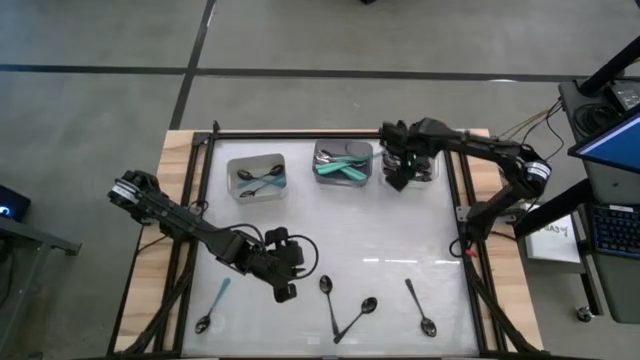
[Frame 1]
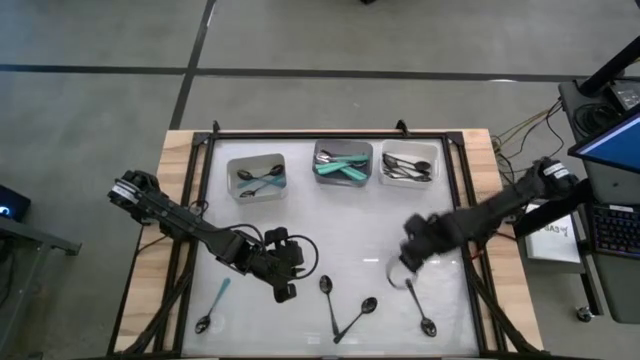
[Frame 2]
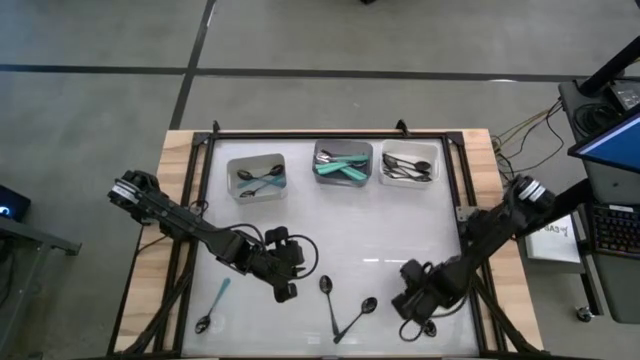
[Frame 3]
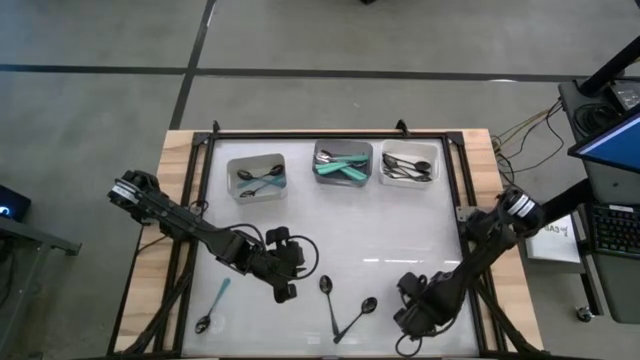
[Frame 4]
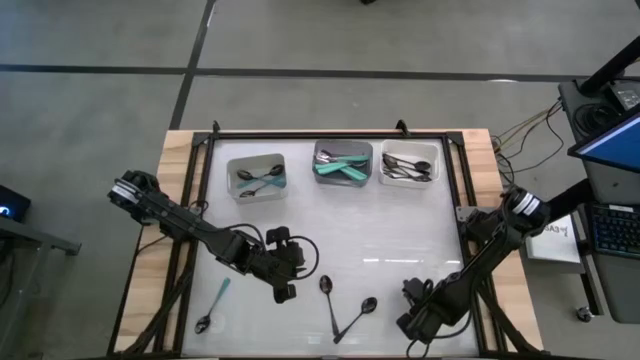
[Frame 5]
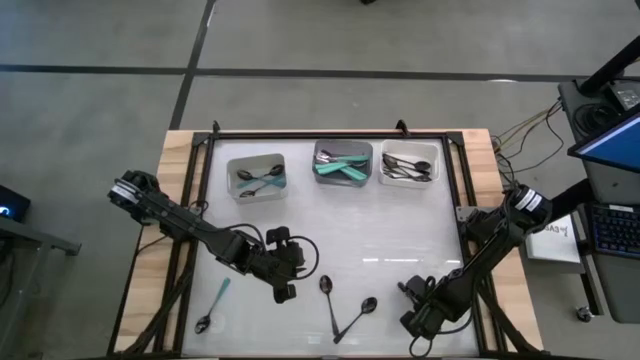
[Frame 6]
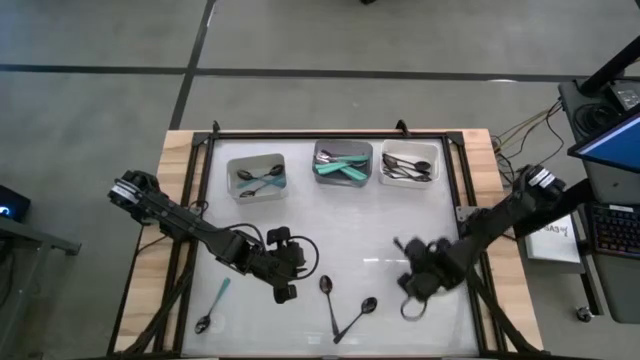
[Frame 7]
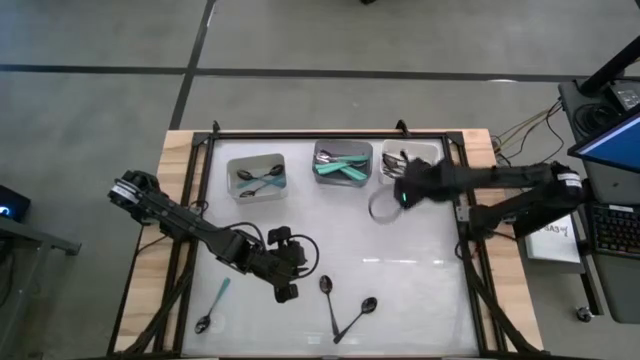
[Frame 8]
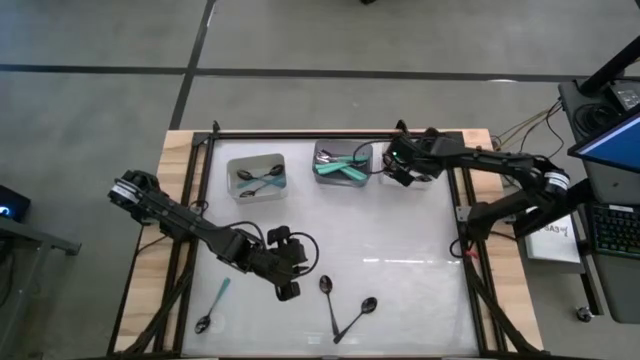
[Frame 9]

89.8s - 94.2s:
Task: Sort silverware by color (type)
Put the black spoon into the white bin

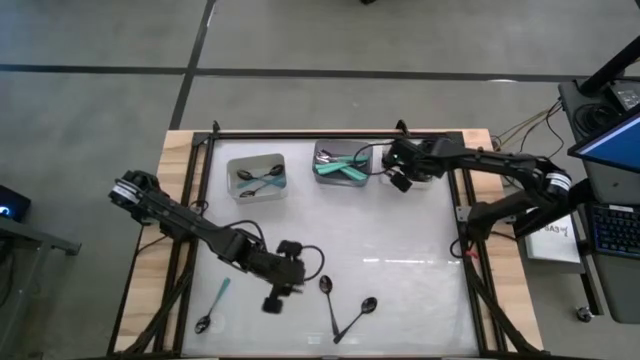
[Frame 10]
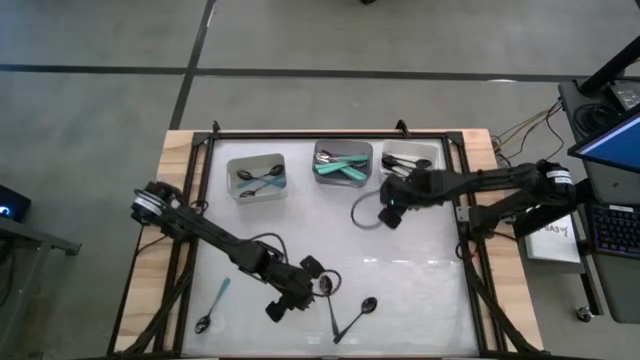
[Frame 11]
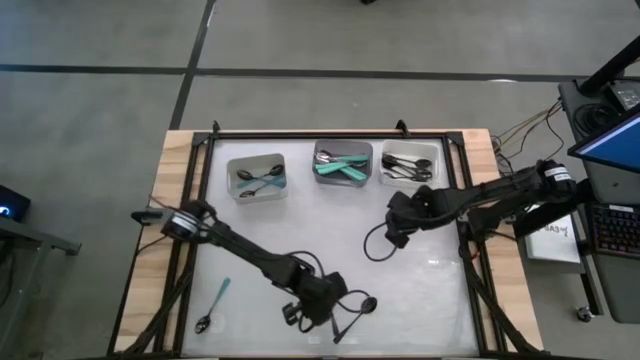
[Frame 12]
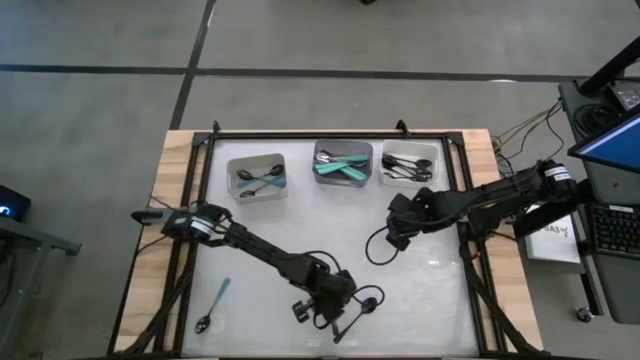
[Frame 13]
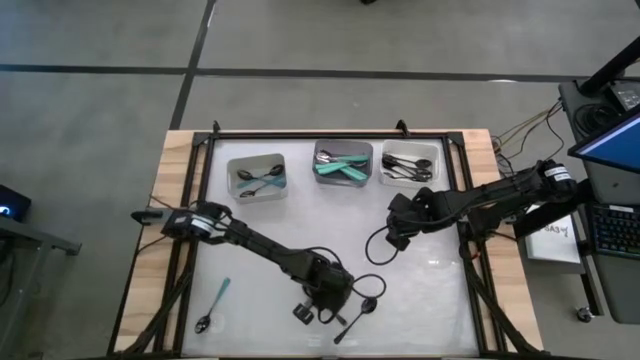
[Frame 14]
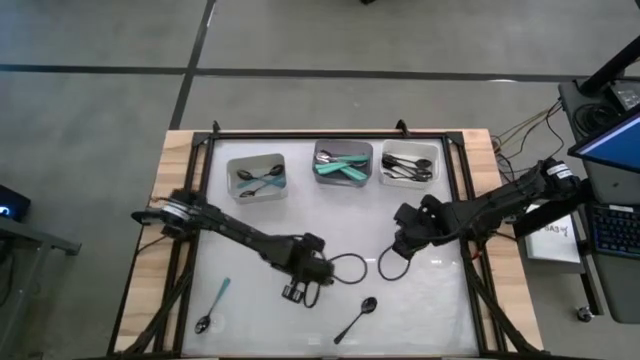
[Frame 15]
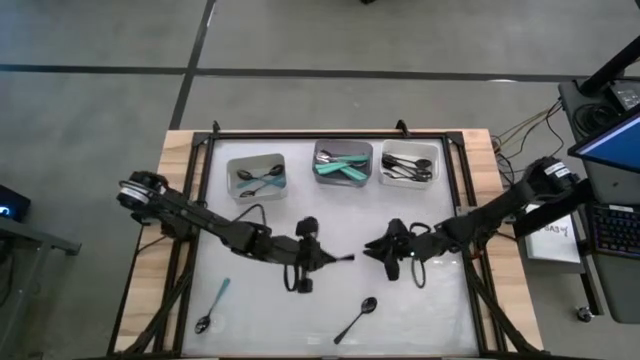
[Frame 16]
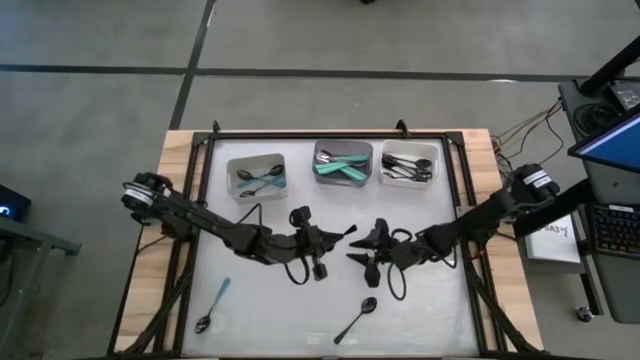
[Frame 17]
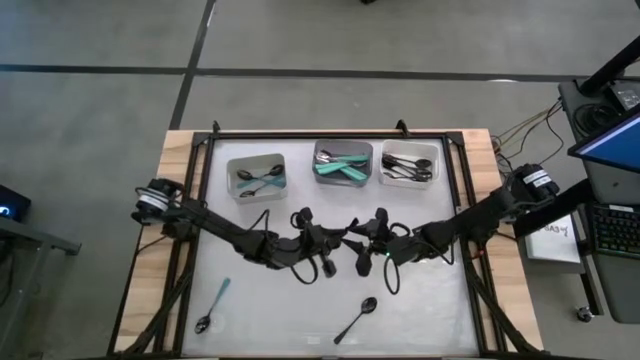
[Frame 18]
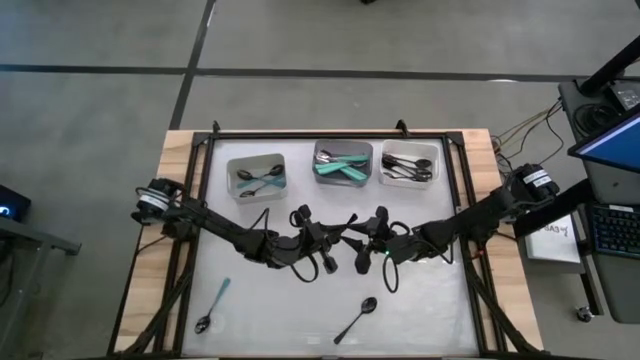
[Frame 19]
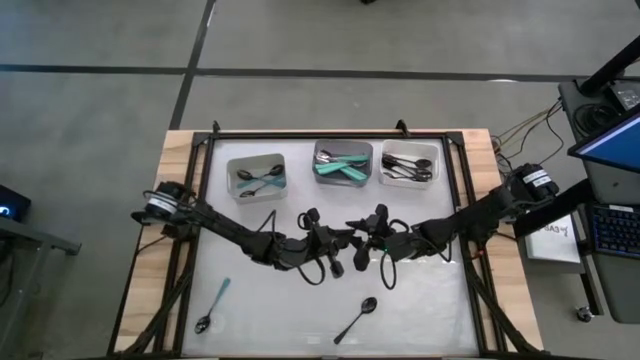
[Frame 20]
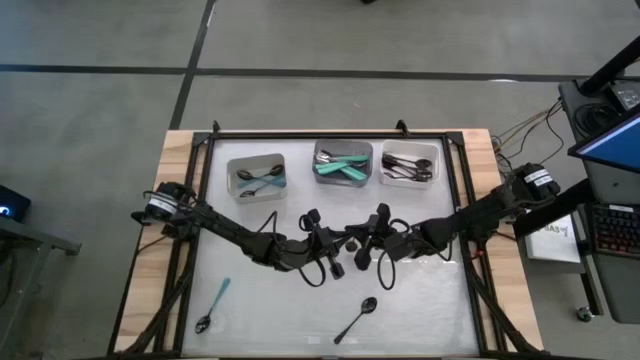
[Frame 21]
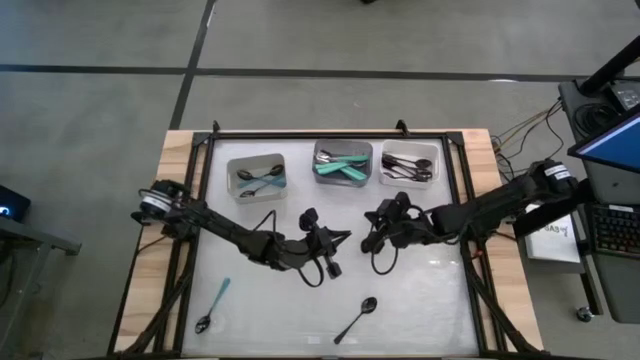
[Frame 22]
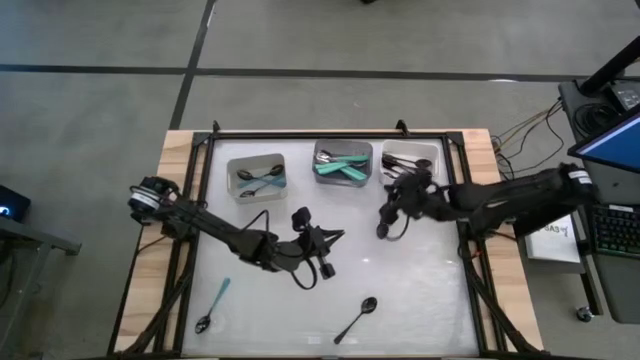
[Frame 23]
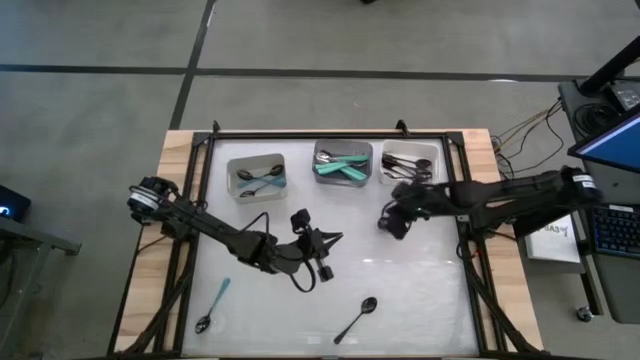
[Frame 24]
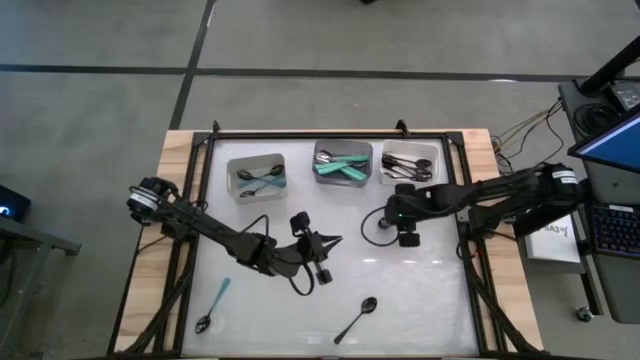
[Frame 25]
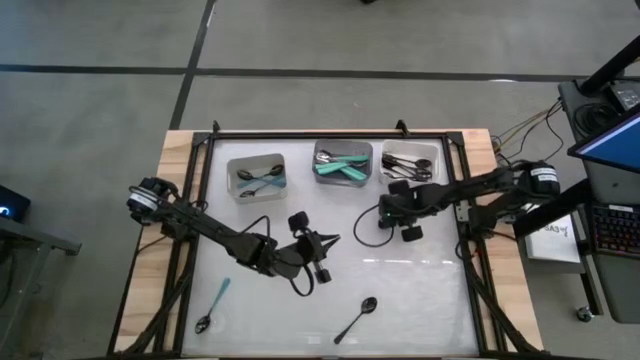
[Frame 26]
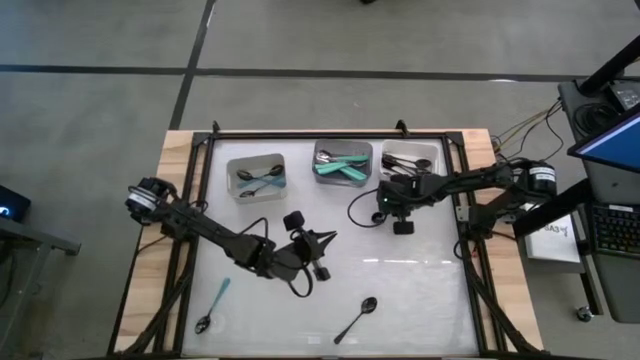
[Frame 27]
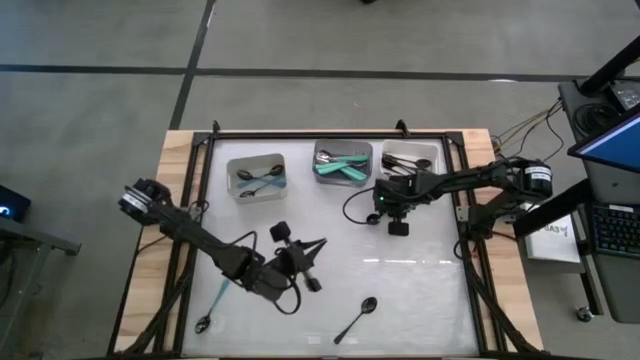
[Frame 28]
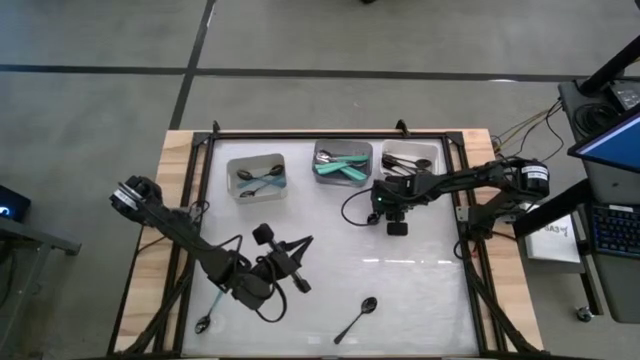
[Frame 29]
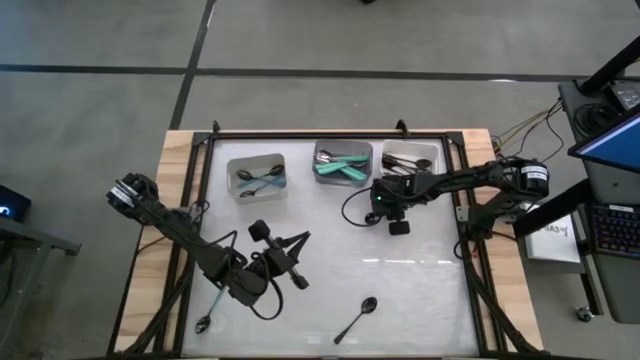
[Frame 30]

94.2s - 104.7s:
Put the black spoon into the white bin

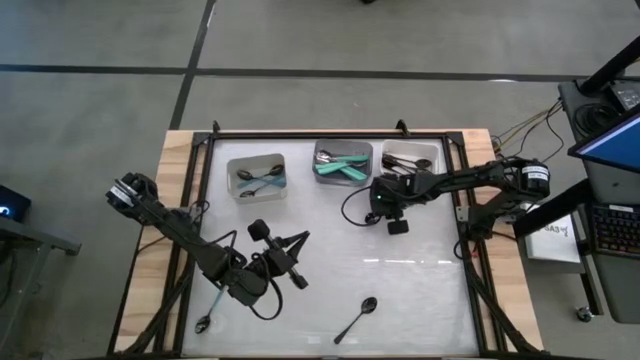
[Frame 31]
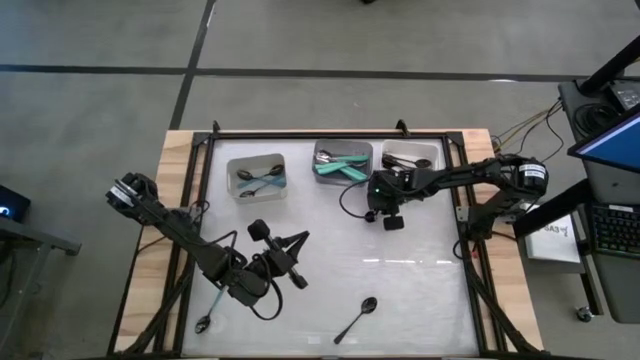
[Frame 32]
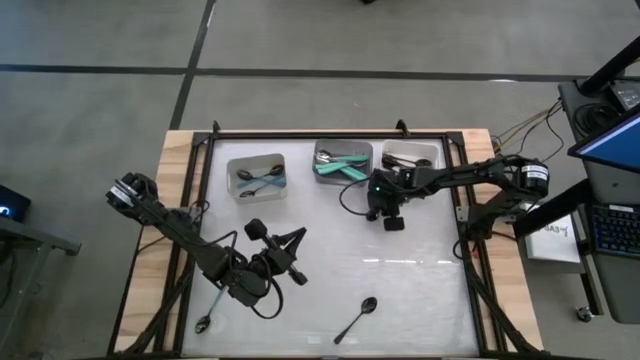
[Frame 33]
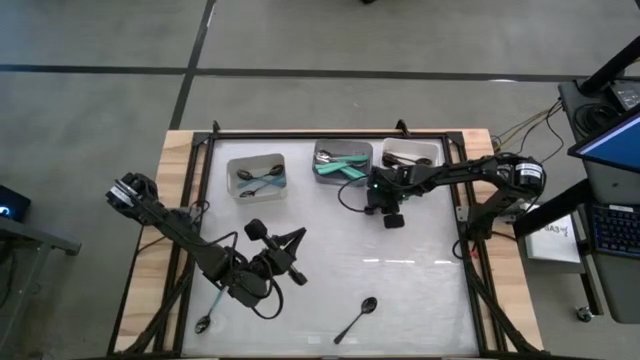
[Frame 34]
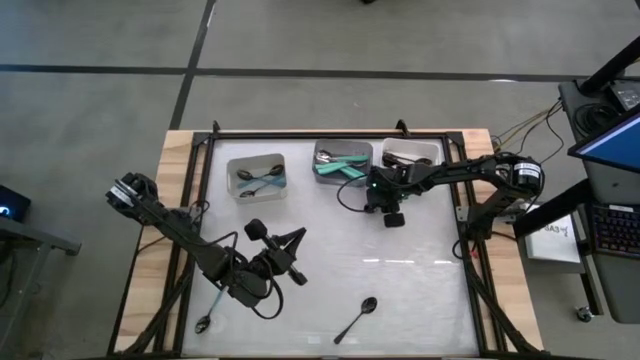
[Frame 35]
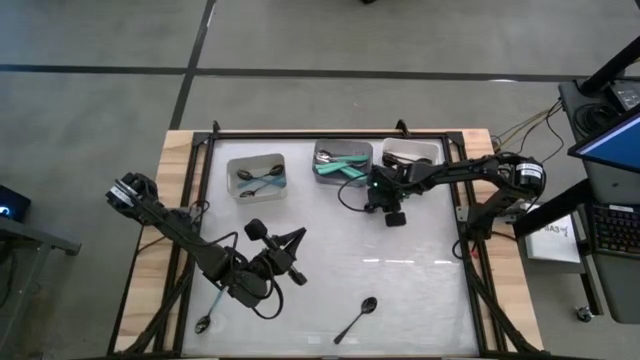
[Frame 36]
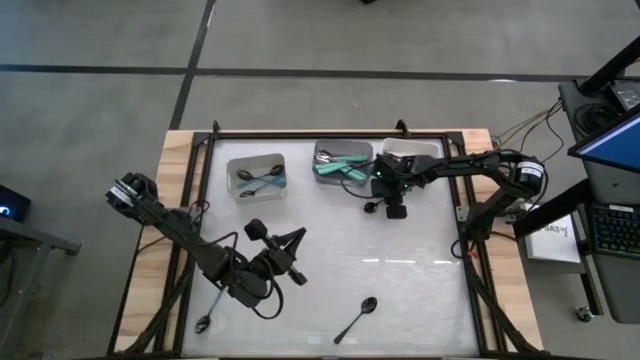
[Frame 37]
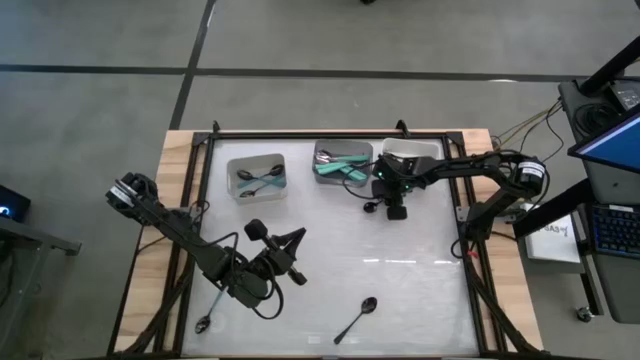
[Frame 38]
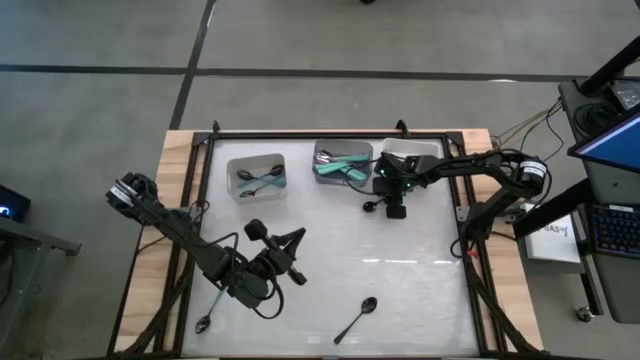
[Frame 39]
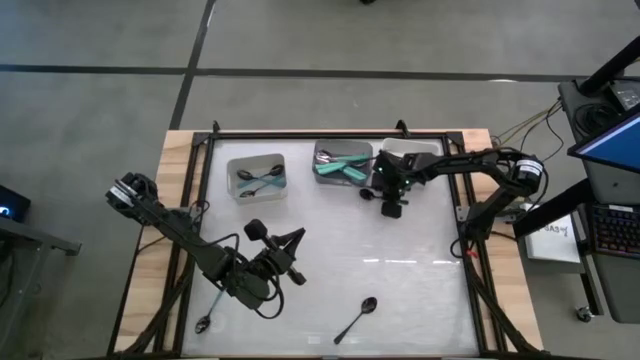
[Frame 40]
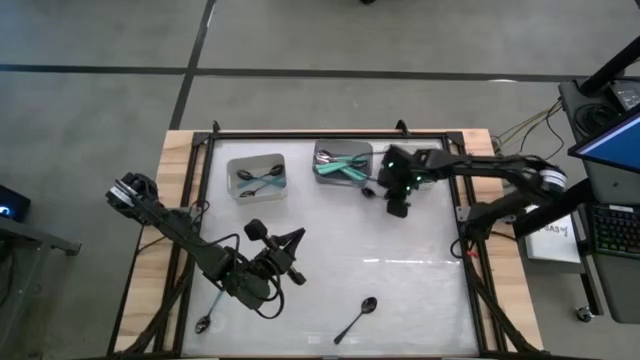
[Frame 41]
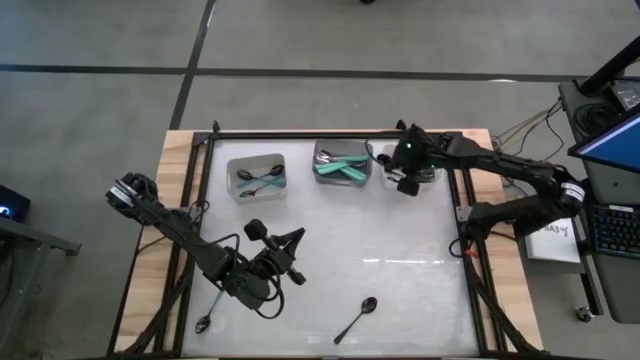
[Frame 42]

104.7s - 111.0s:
Put the black spoon into the white bin
